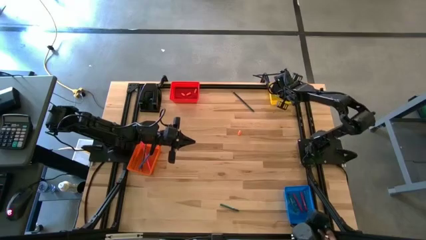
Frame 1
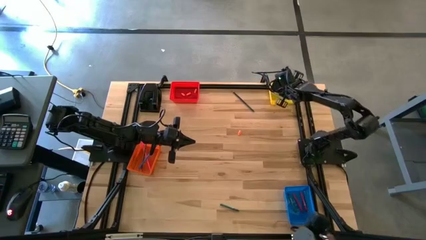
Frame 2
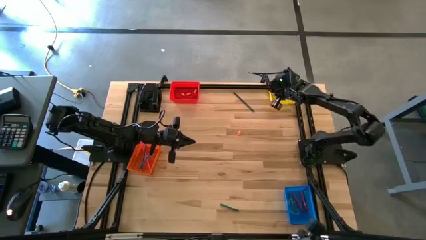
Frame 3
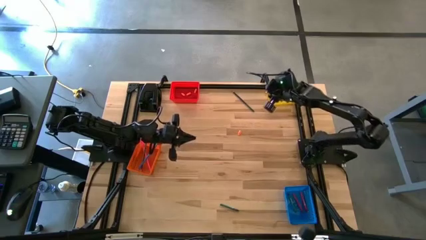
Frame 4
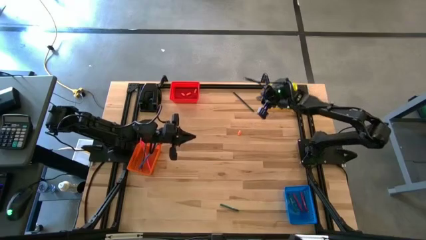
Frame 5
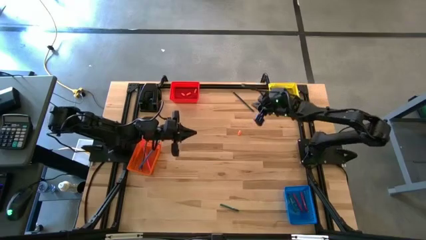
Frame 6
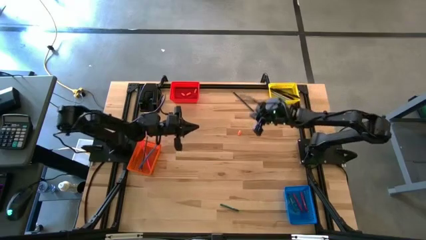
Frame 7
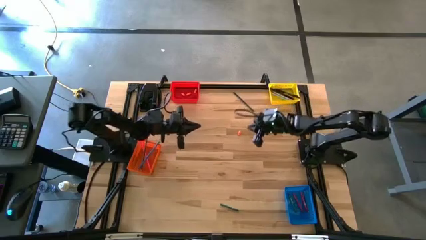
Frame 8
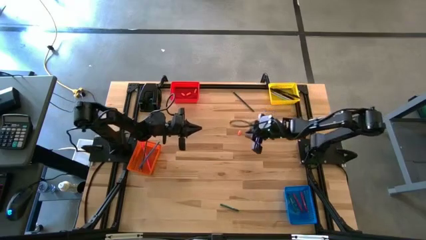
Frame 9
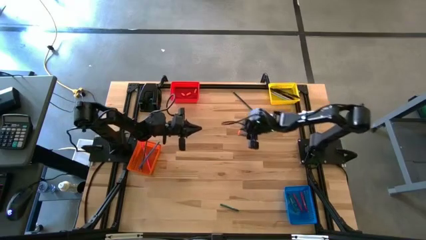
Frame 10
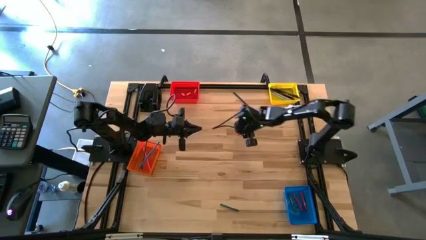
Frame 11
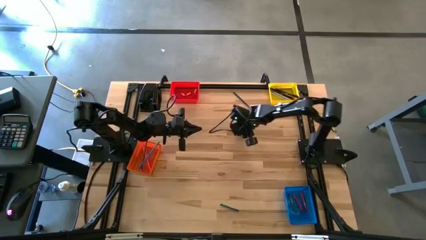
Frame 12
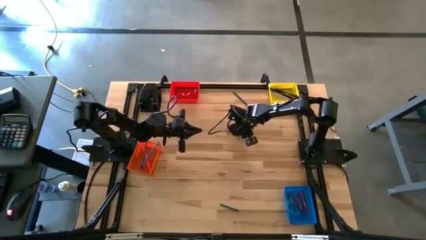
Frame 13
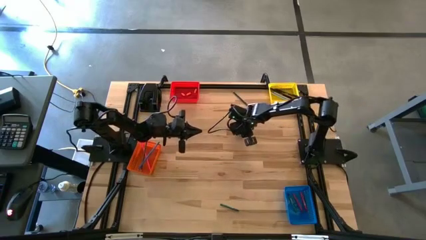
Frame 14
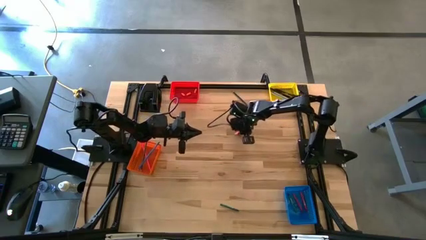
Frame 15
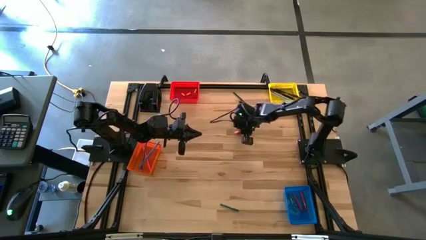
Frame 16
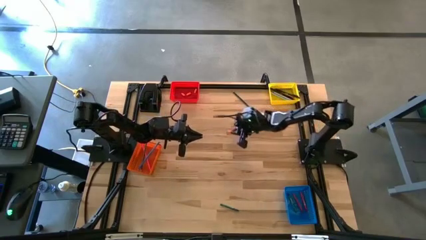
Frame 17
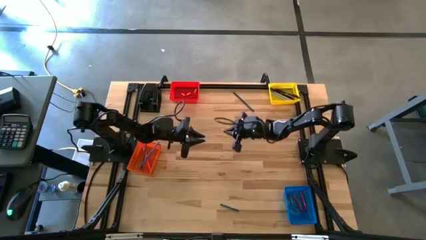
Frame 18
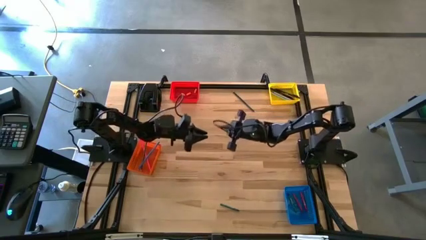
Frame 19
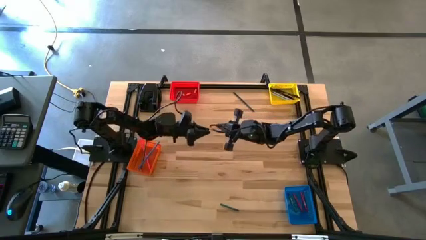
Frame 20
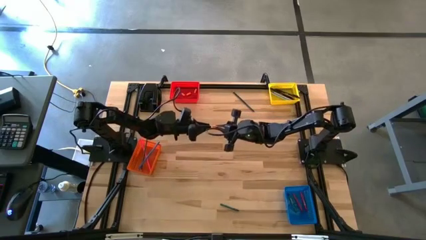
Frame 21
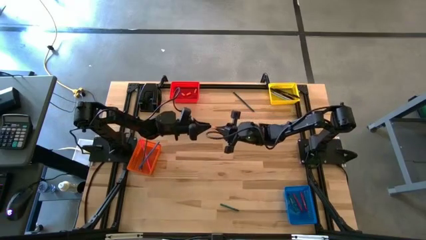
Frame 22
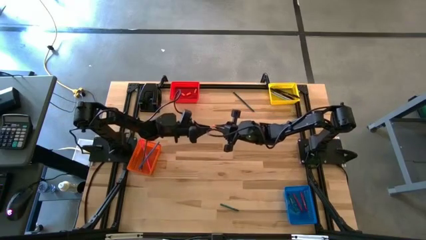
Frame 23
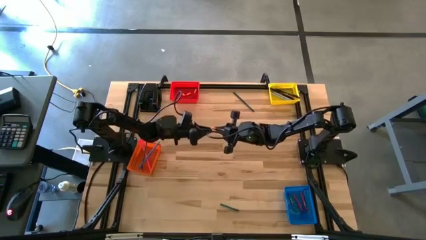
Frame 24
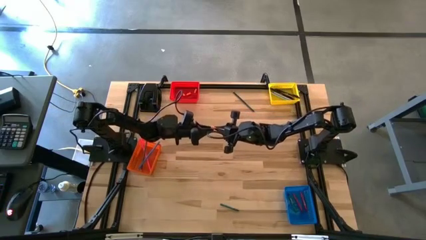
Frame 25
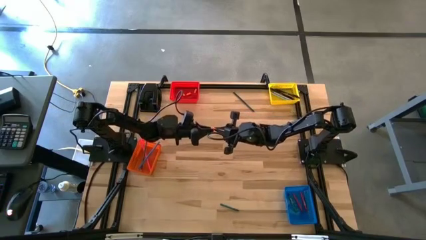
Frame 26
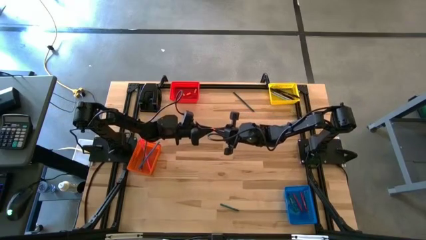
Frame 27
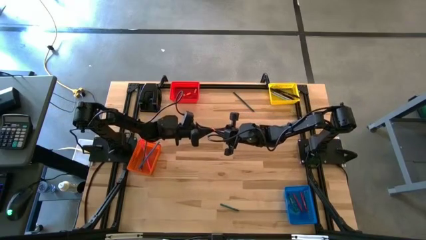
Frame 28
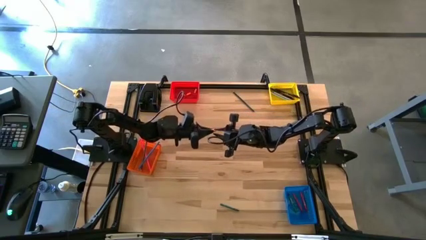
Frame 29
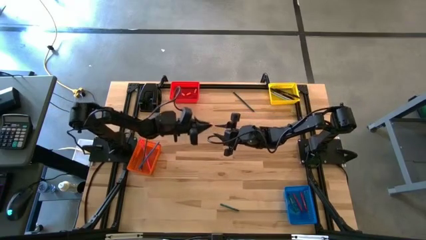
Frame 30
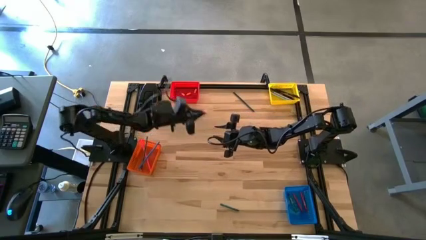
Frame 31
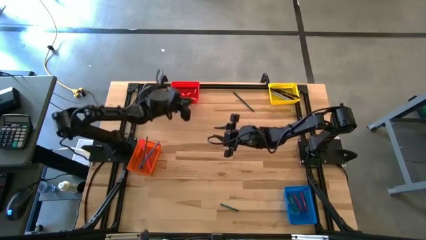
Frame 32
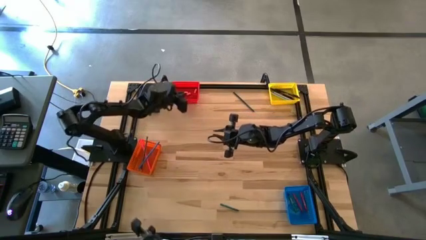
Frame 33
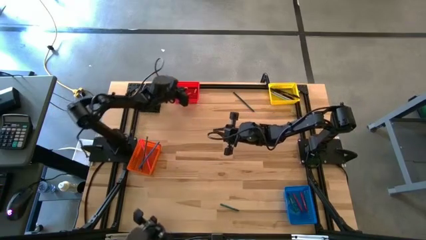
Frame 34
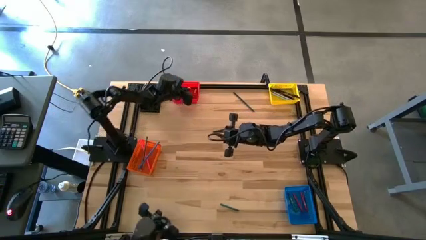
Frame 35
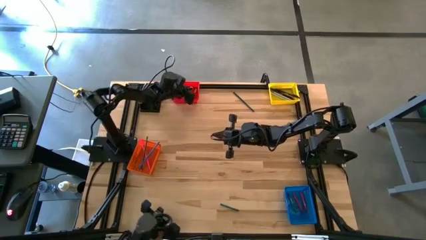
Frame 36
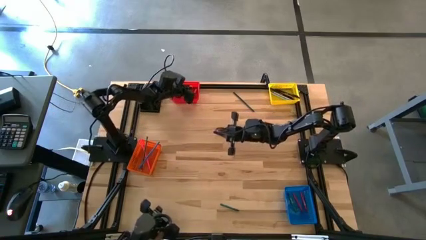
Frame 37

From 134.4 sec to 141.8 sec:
Task: Sort crayons/erasers/pens/pencils in bins
Put the orange pencil eraser into the red bin

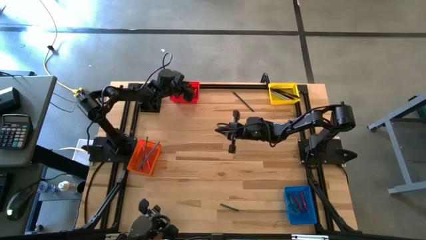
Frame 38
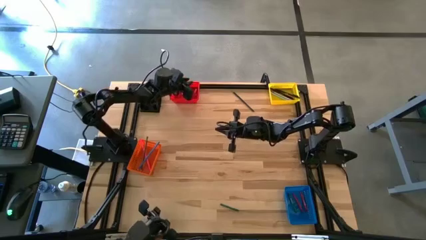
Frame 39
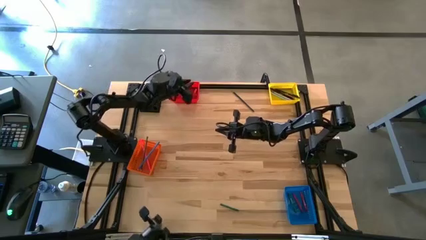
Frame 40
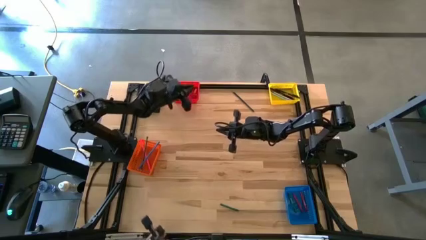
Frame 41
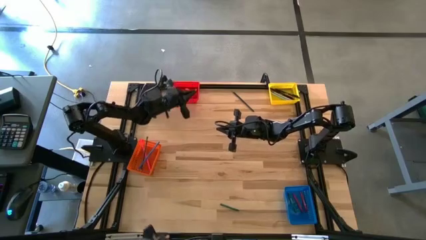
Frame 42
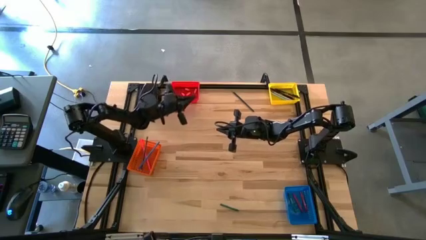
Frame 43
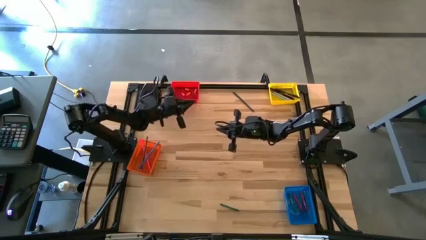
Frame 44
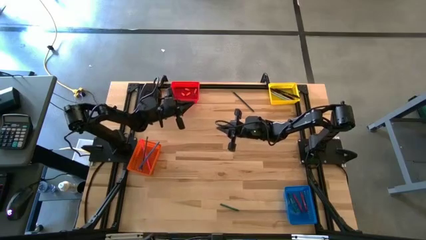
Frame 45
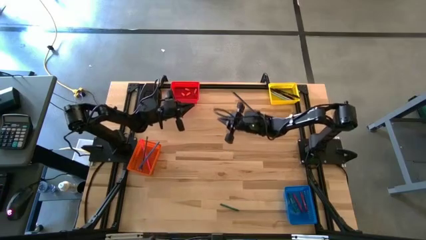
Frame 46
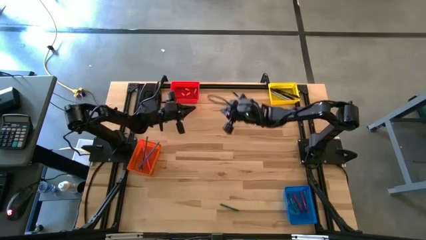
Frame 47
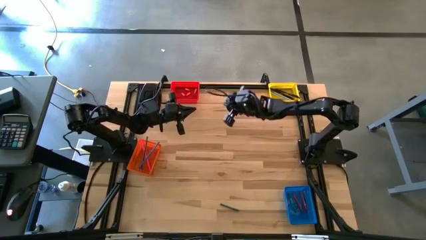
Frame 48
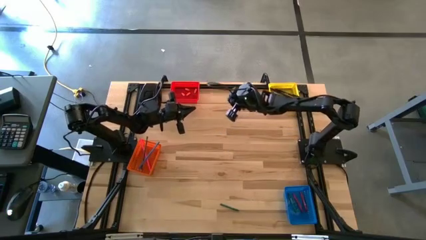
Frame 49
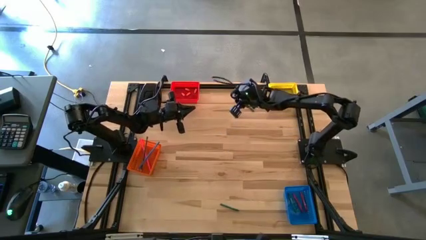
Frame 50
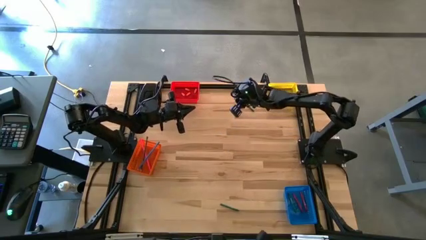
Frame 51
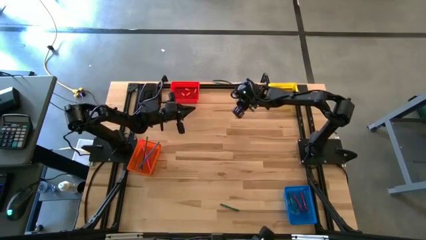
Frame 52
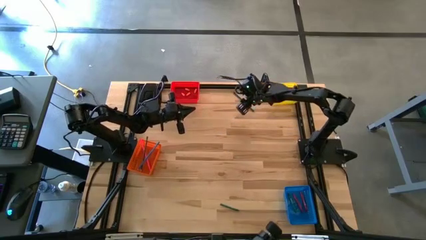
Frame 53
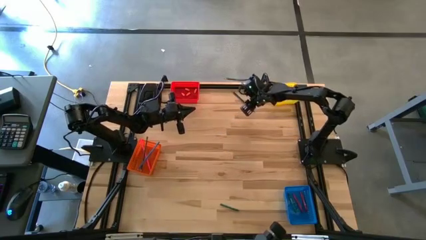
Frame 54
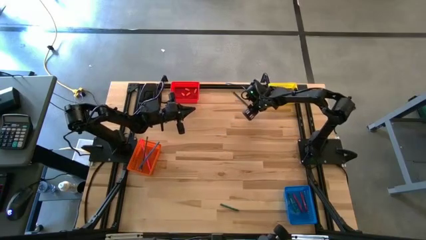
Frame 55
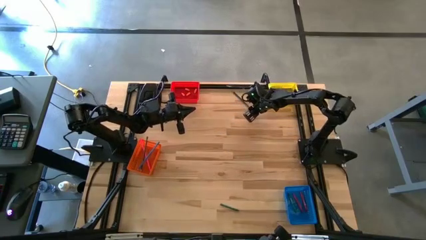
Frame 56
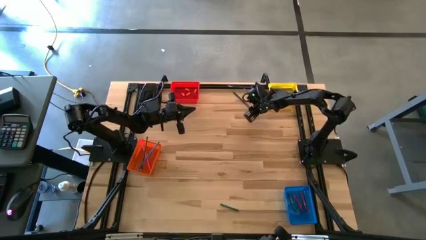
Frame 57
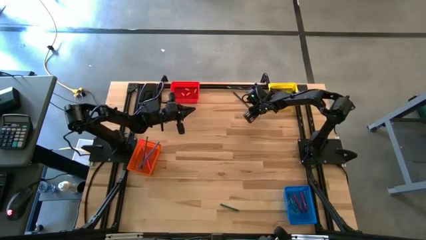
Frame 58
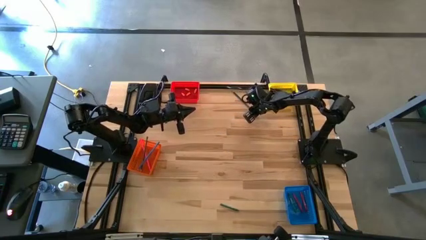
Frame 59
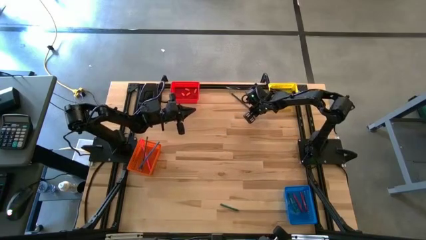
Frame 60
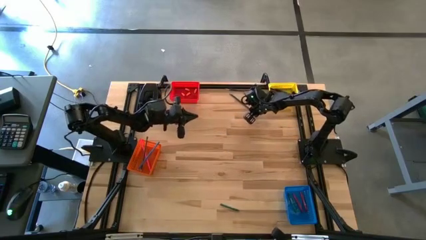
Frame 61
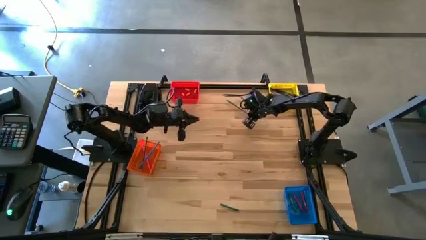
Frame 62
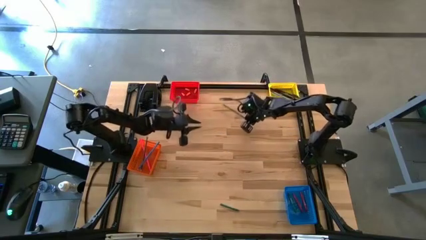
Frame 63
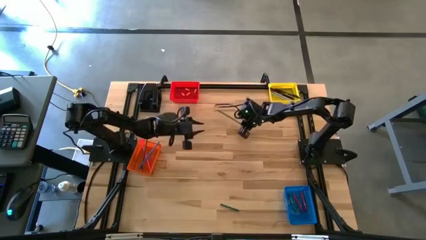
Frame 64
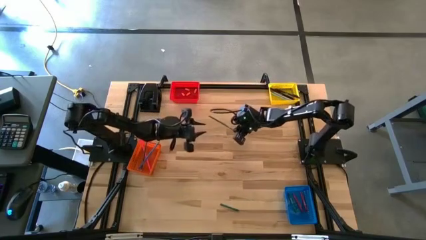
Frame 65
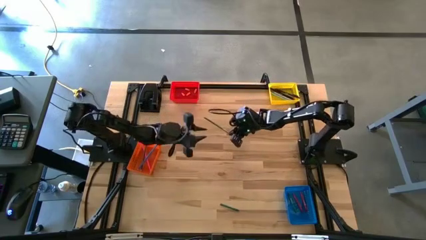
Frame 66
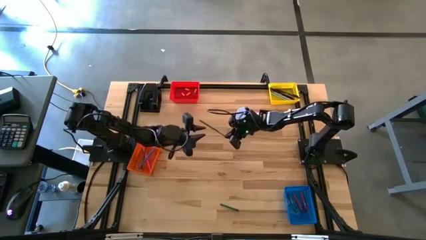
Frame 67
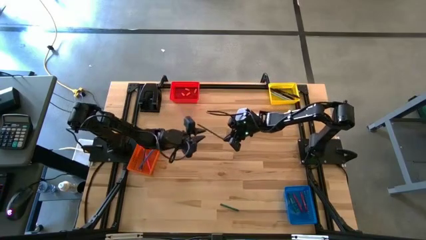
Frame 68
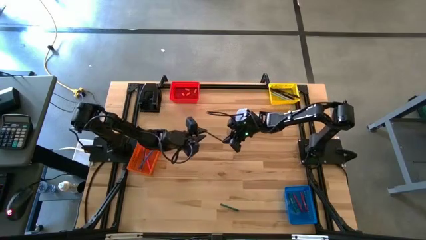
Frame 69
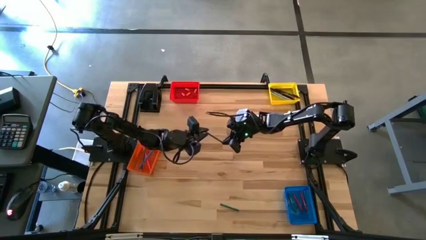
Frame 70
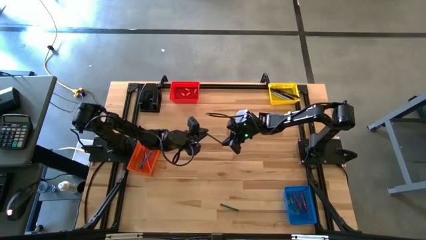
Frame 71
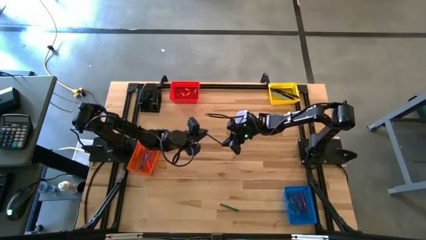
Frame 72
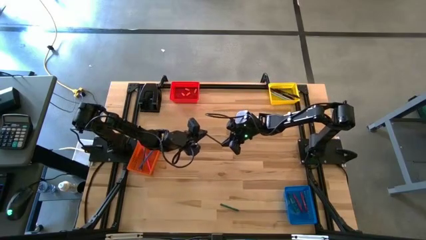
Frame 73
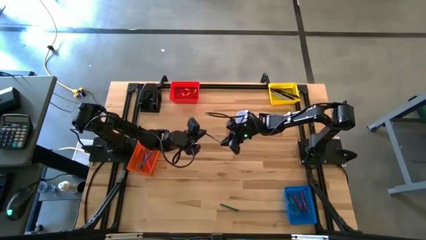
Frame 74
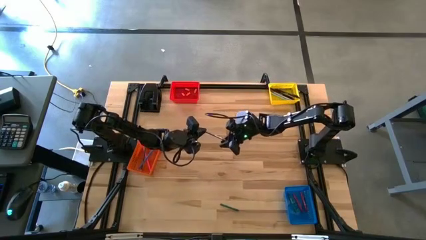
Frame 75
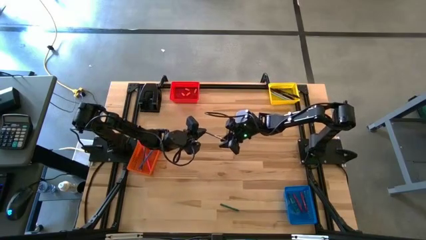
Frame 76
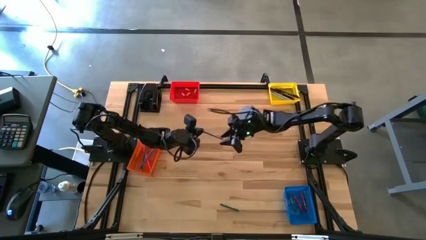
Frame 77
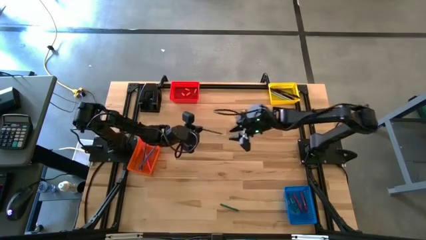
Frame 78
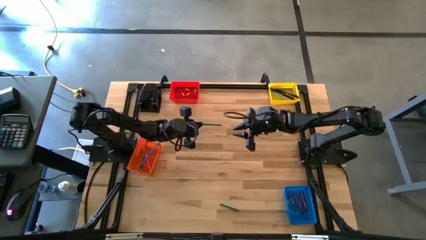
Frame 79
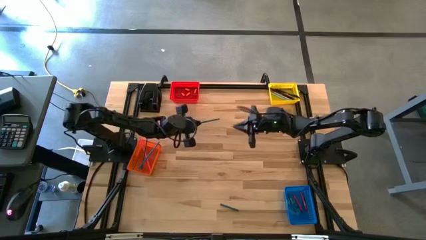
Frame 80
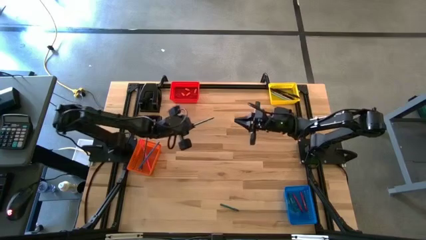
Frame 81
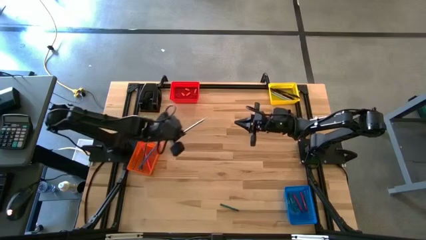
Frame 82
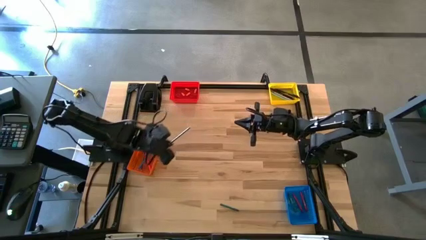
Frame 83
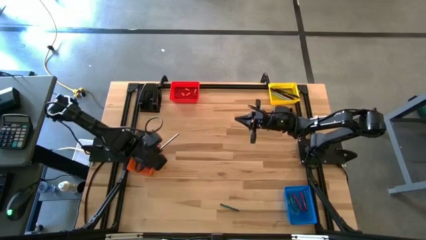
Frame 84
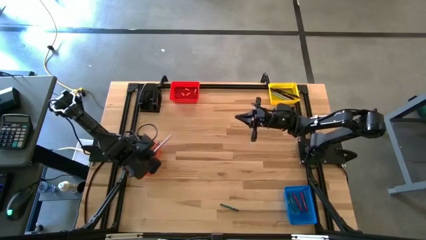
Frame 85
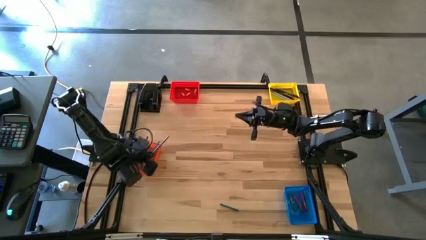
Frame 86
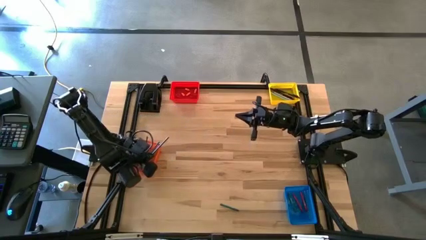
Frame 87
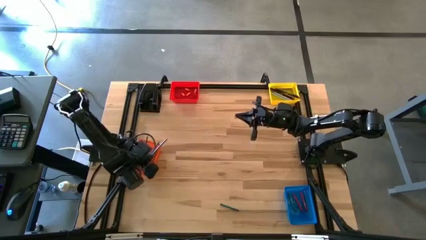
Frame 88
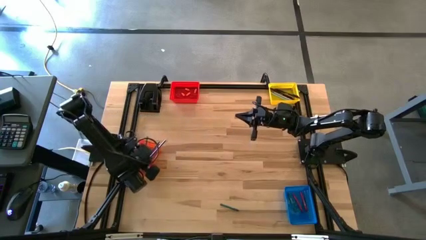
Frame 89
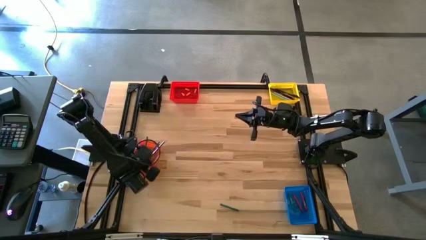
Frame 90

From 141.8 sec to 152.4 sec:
Put the green pencil into the orange basket
